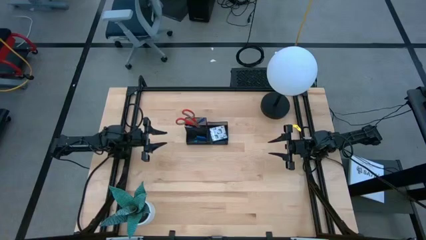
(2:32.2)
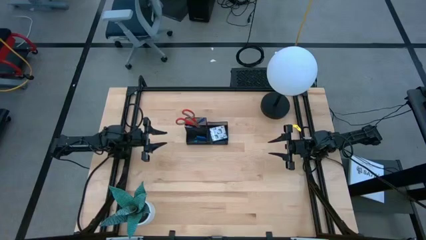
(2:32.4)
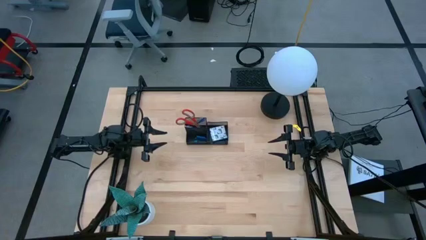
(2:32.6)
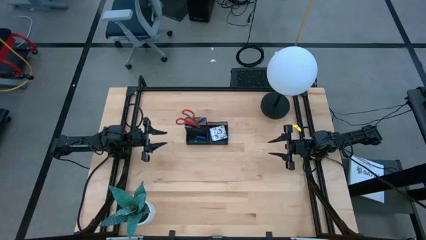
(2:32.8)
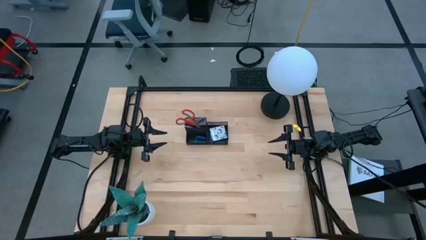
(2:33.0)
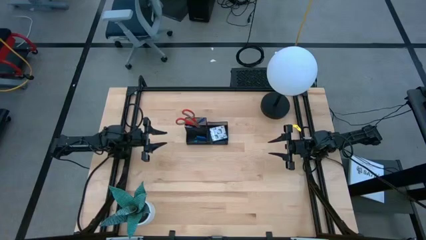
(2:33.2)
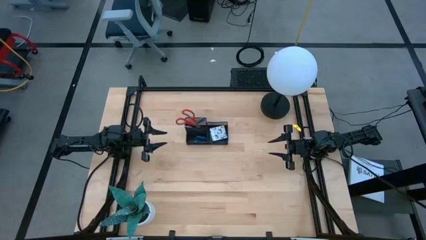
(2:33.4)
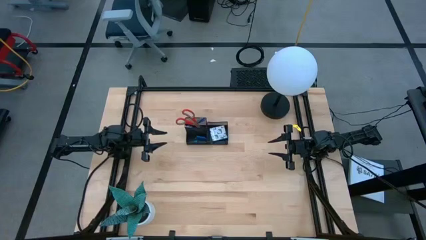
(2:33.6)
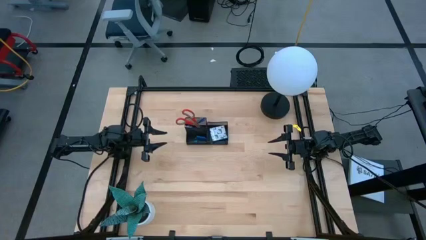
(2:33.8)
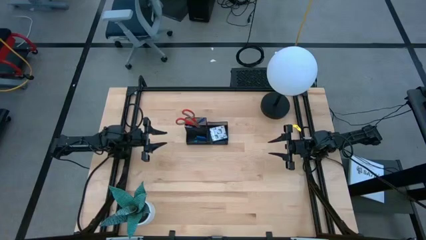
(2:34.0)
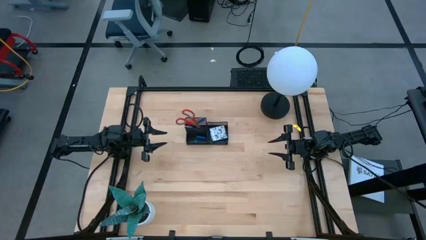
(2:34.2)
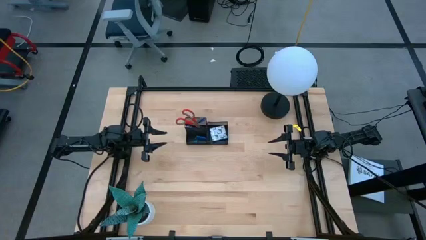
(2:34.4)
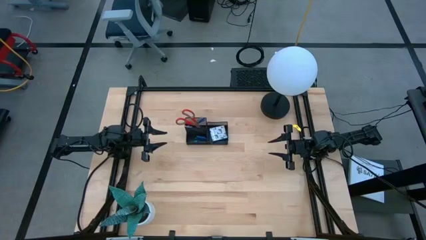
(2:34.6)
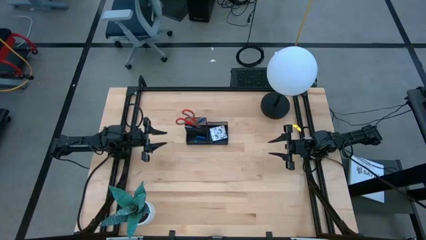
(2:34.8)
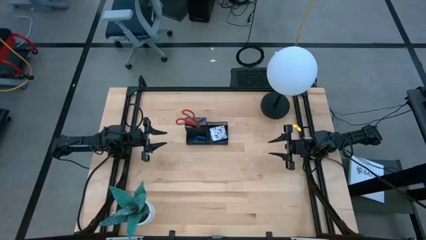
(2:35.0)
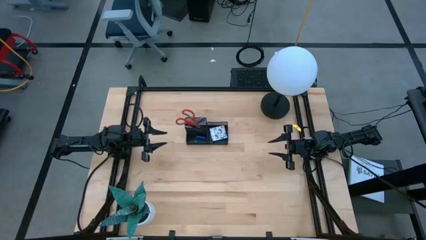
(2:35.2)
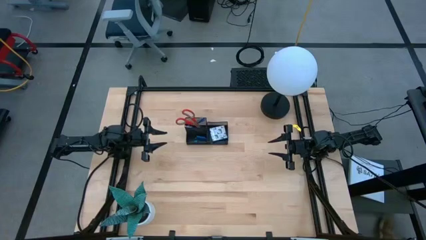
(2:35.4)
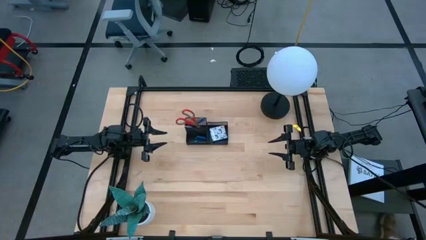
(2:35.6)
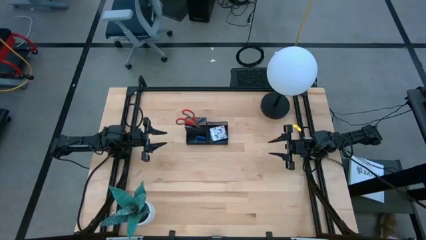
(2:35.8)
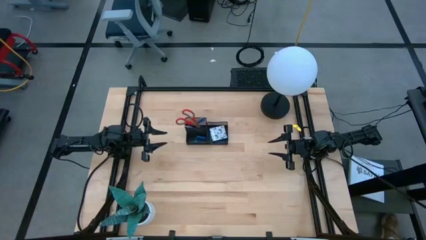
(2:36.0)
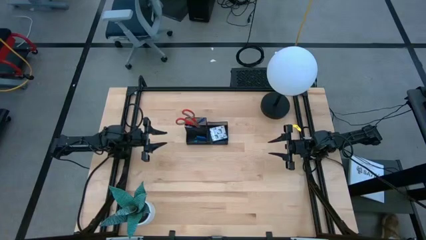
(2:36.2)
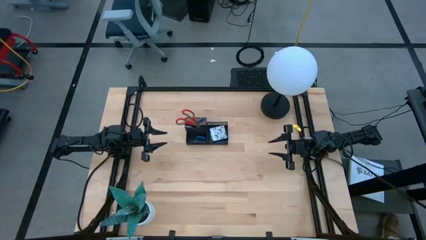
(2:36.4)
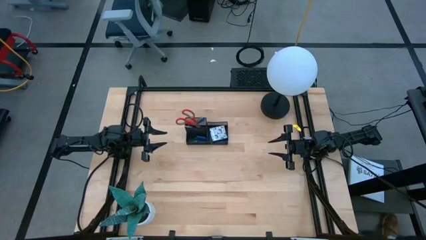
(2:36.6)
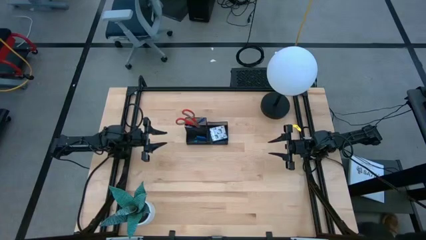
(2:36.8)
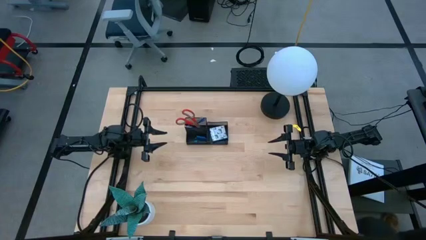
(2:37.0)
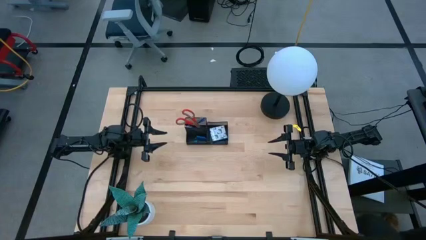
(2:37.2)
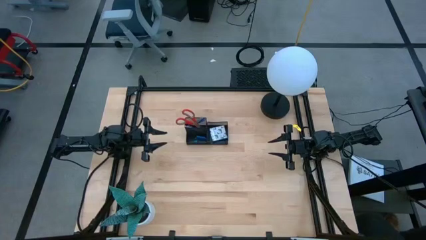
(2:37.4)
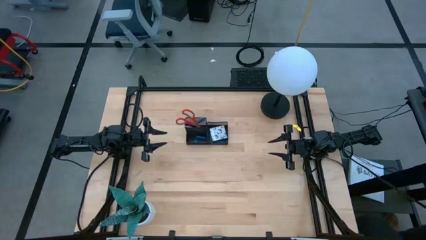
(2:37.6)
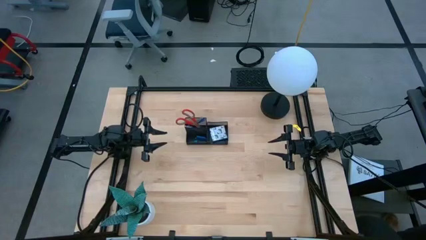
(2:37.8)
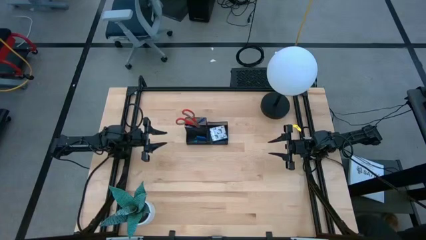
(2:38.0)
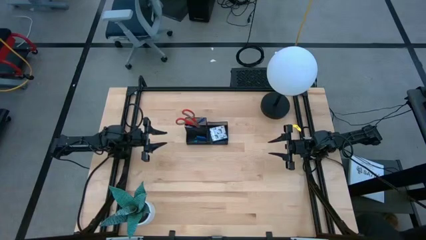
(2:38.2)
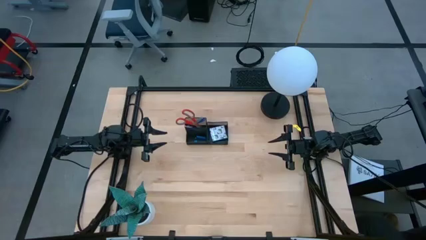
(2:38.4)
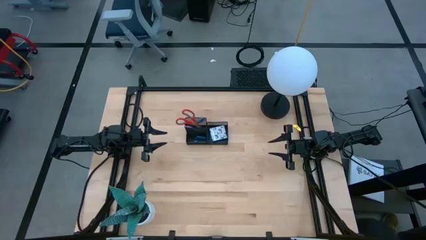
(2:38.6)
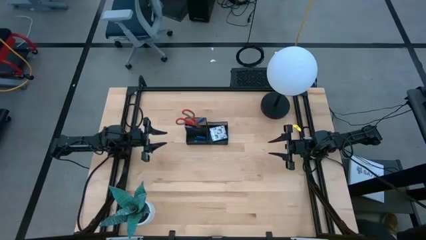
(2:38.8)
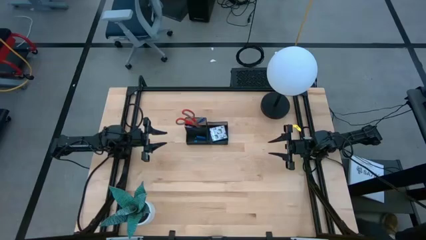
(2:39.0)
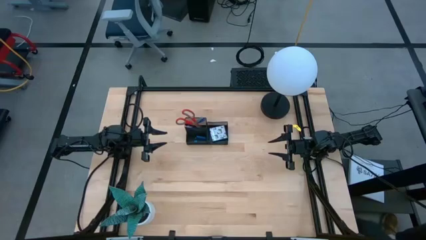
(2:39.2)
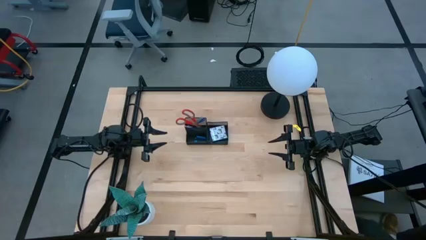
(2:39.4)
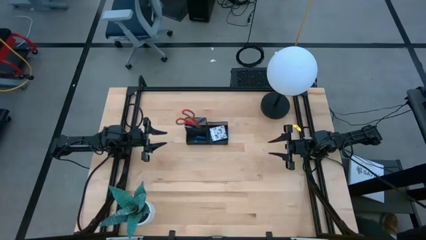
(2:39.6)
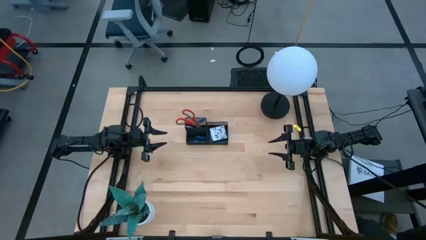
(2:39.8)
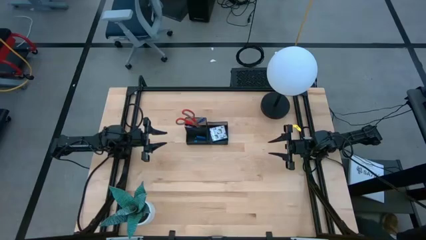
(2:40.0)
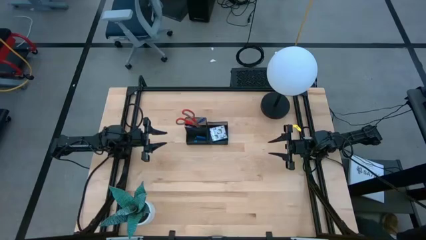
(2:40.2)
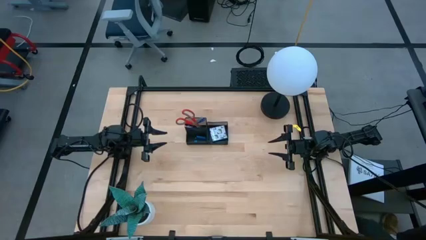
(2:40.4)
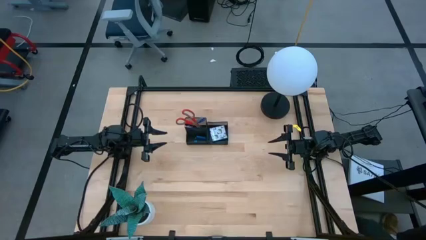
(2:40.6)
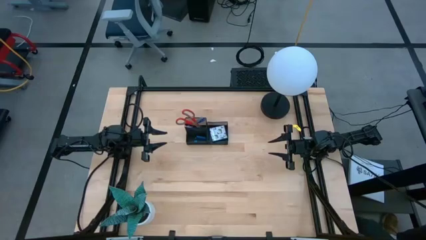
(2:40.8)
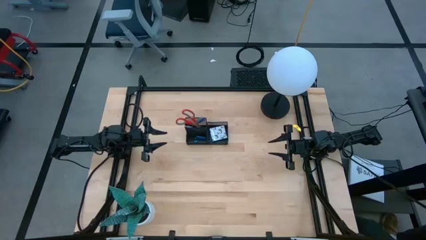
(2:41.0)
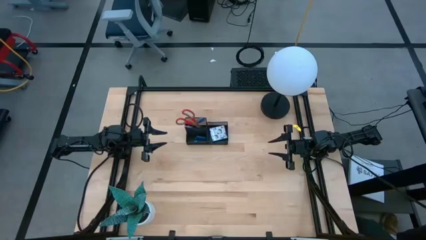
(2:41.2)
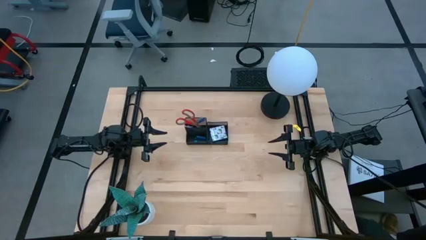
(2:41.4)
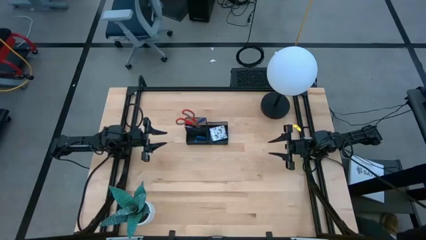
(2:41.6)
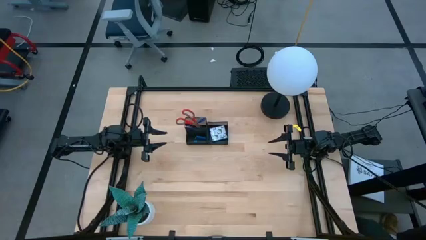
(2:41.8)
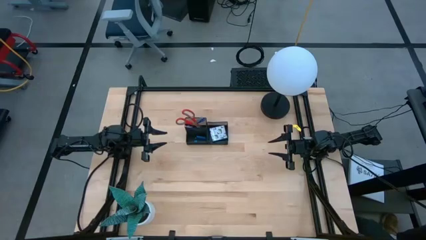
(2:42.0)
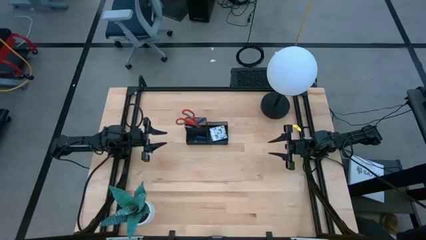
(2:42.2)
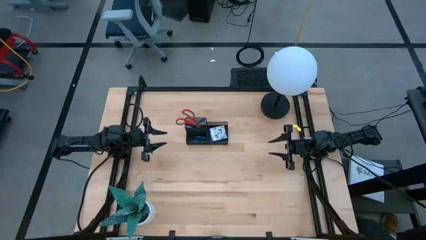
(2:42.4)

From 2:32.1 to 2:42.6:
Task: Pick and place office supplies into organizer
Return to Home Position

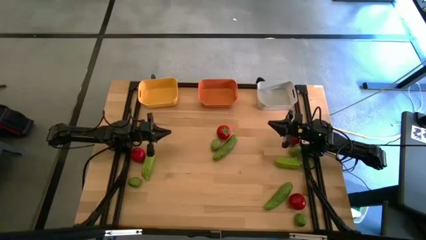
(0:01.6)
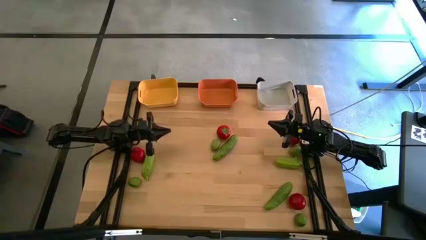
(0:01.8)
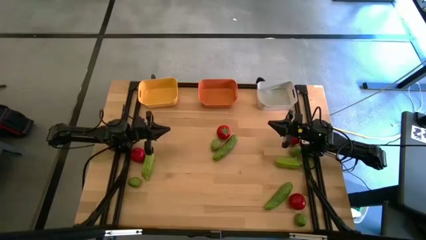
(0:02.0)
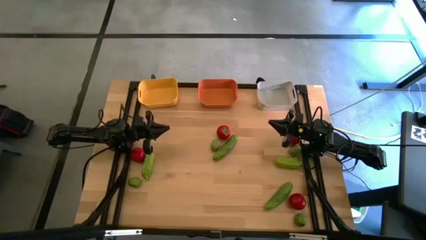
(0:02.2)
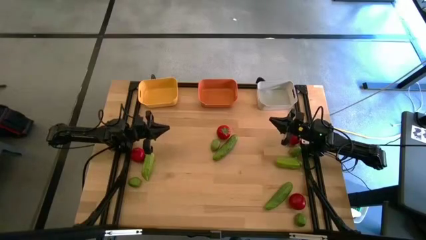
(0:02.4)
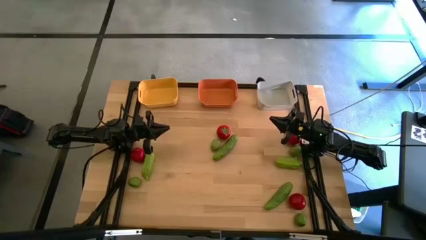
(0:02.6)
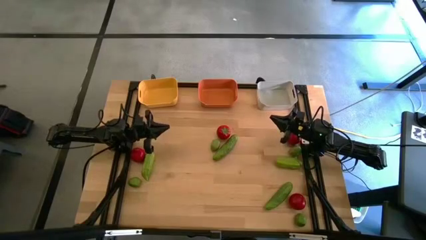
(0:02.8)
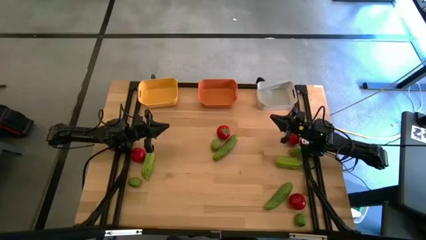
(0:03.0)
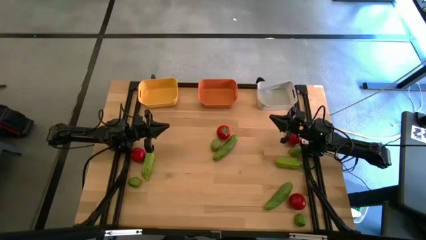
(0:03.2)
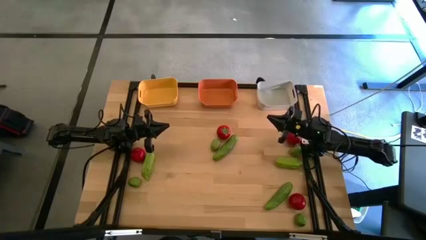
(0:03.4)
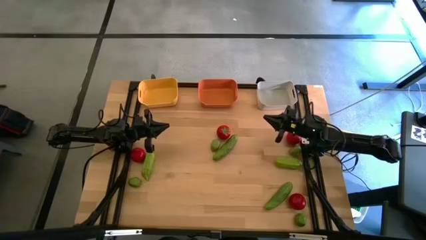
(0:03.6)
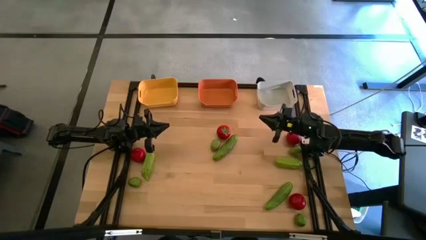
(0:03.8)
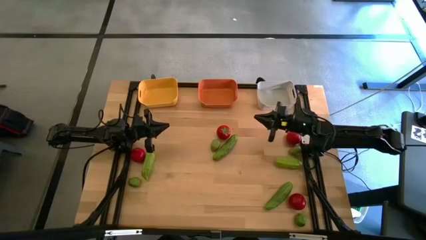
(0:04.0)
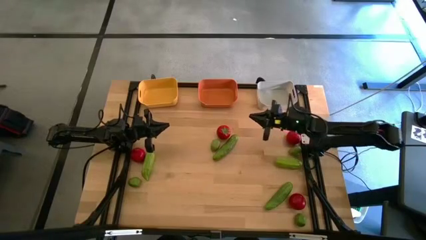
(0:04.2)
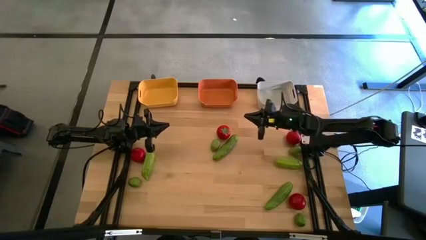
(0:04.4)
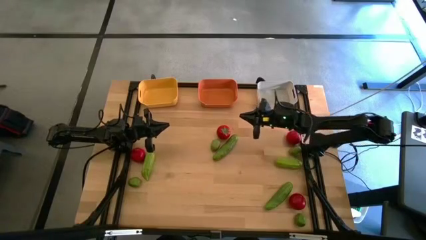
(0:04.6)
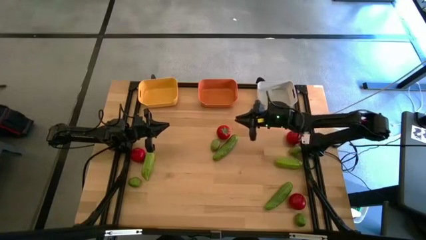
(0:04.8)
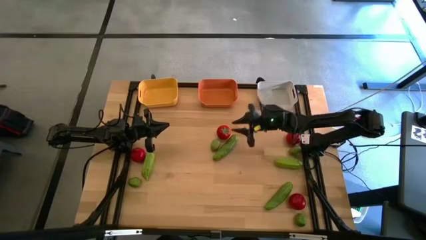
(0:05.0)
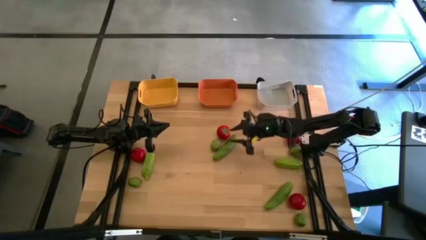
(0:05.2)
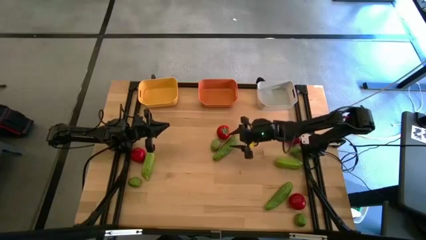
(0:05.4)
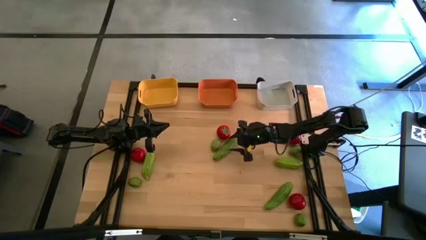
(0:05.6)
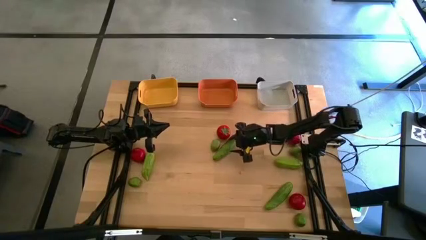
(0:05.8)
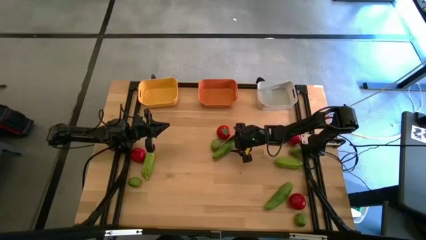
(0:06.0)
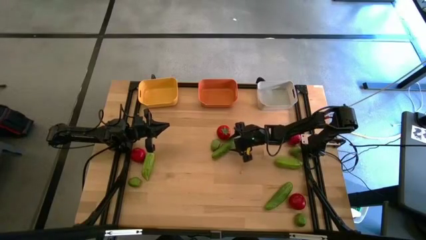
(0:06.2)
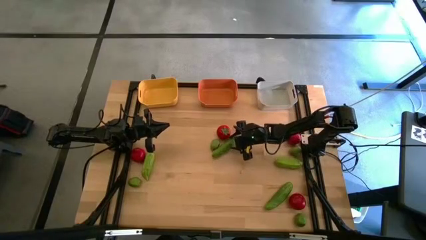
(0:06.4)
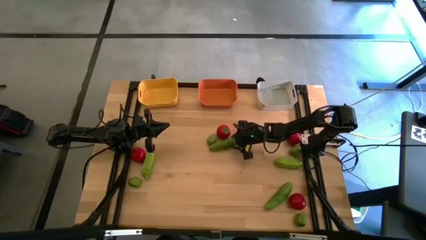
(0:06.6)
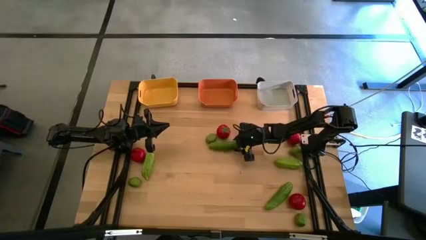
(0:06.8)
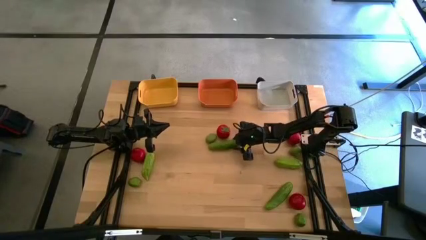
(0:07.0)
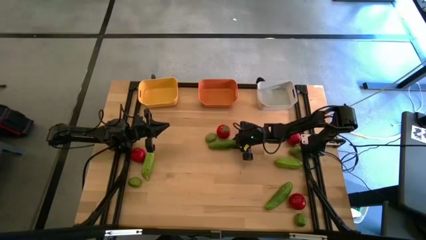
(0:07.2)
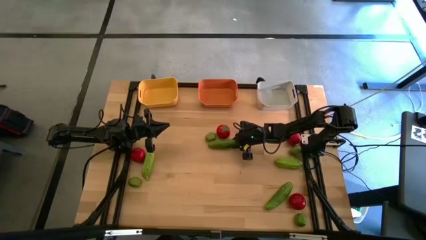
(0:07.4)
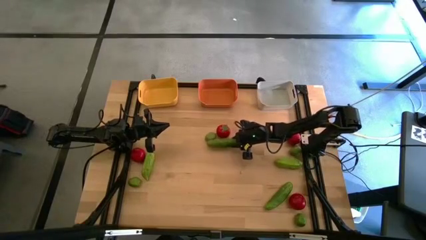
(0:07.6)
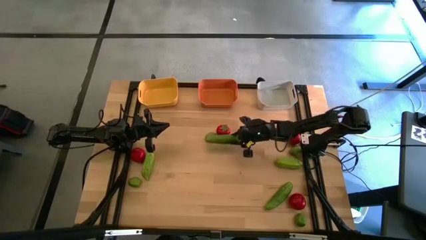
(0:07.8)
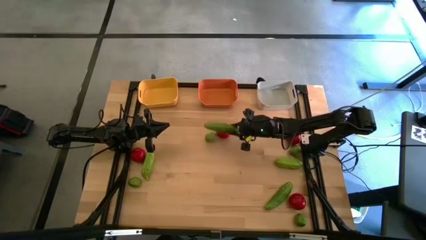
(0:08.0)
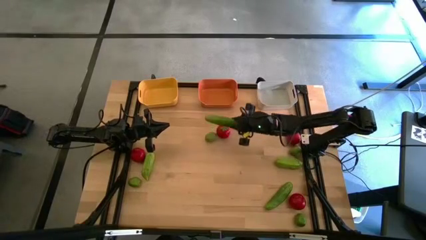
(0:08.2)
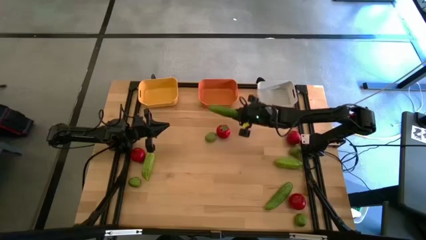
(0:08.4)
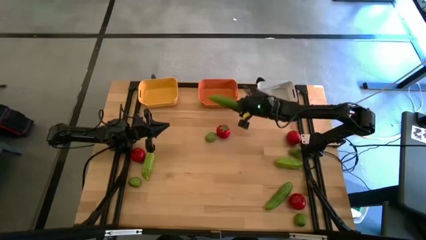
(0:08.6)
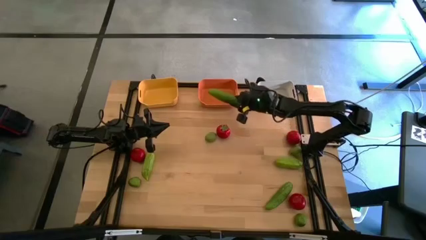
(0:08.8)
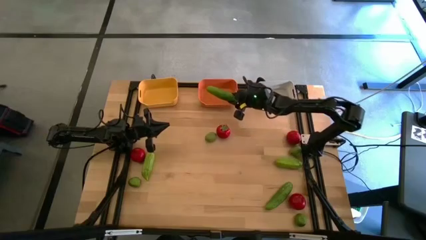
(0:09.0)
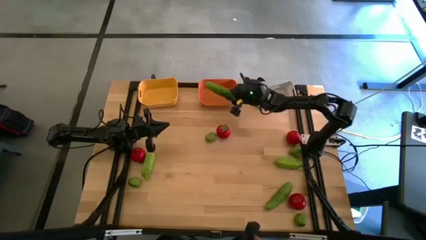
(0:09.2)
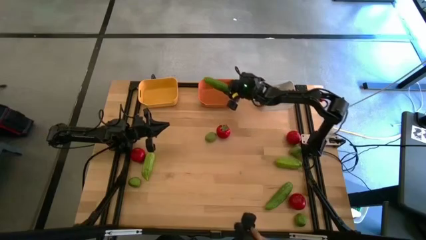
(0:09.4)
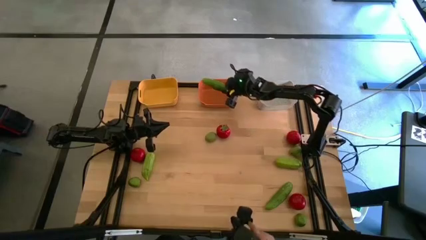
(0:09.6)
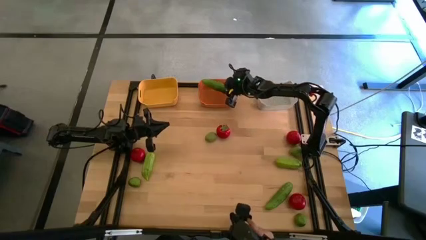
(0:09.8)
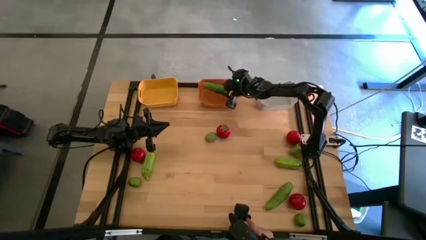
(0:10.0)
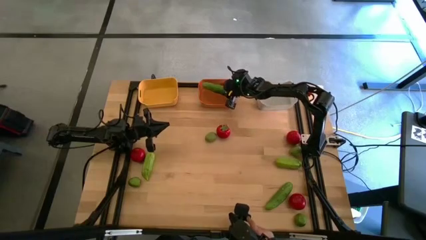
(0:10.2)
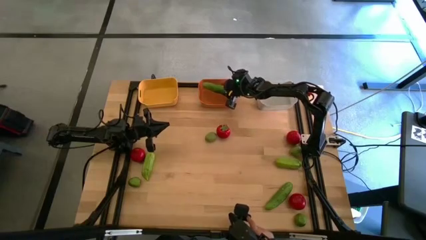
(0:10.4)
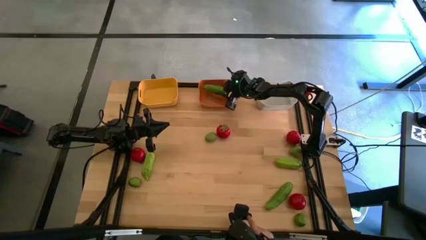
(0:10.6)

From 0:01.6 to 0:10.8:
Task: Sort produce into baskets
Put the cucumber into the orange bin
